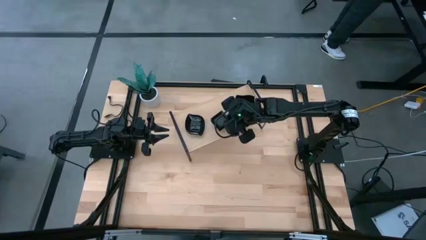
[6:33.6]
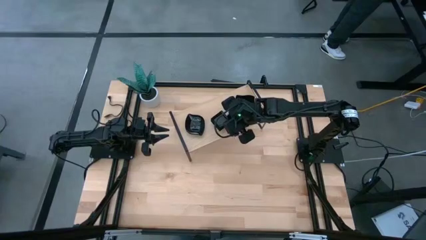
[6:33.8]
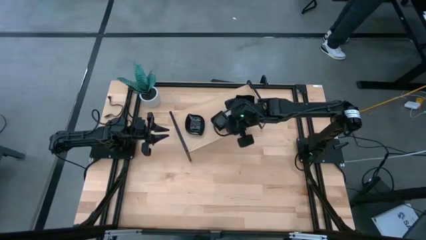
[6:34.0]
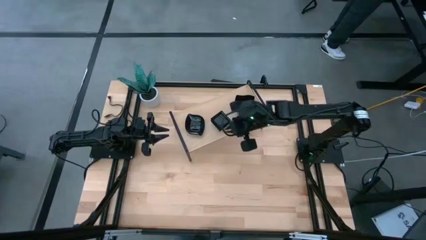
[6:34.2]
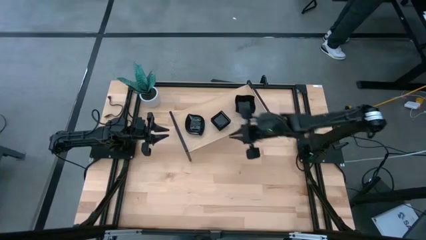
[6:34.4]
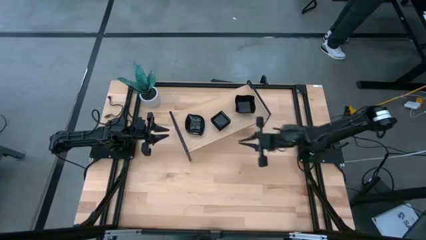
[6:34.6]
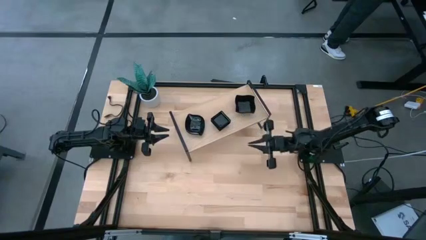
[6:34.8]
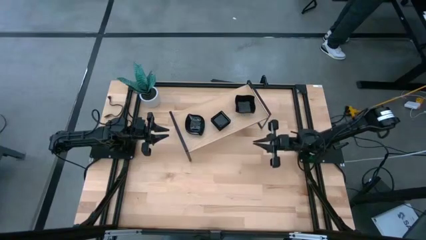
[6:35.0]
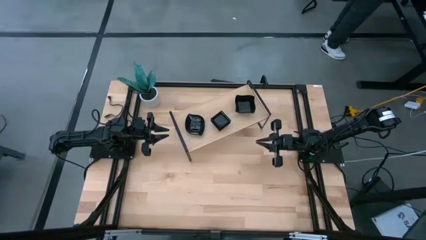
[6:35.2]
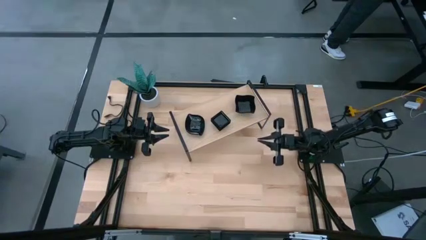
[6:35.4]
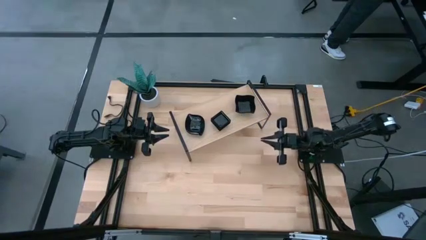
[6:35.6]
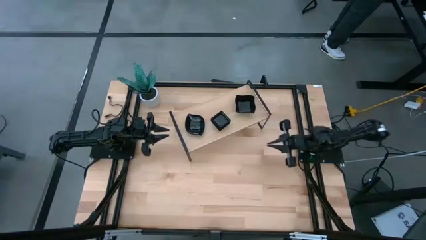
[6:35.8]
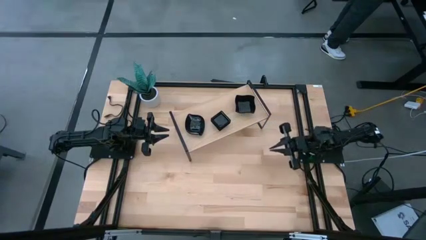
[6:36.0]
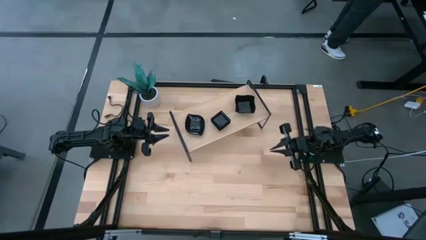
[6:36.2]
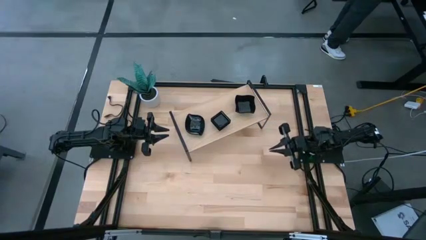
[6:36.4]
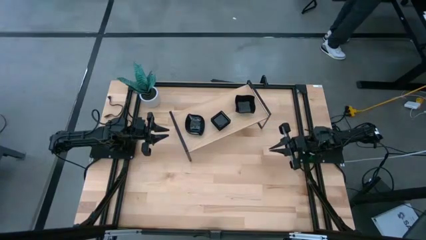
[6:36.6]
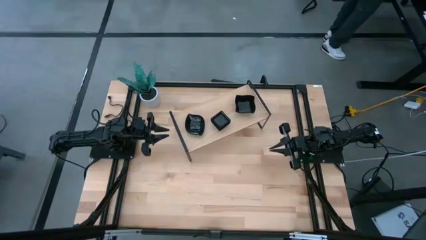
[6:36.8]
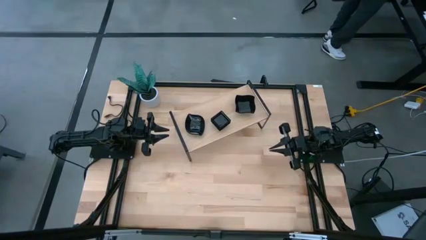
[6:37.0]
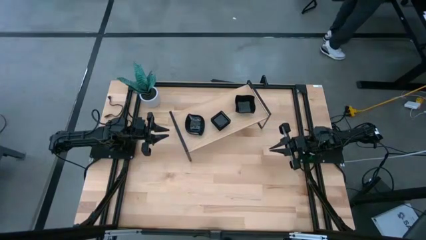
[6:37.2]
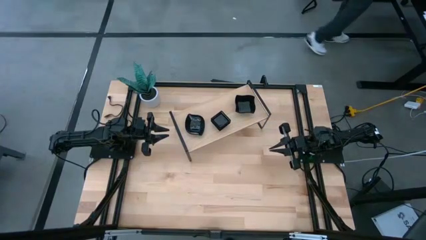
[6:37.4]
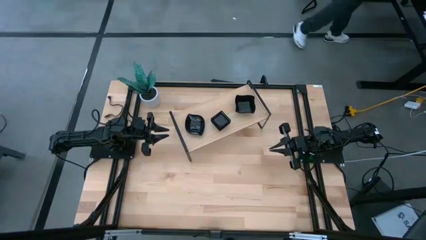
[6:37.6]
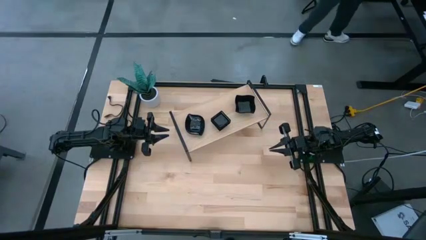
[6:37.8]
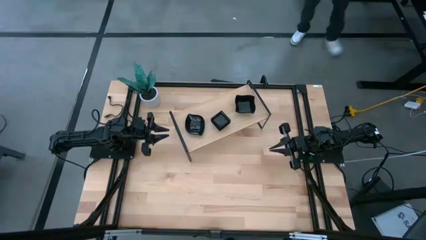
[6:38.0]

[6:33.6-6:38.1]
Task: Pick & Place Mini shaped plates
Return to Home Position

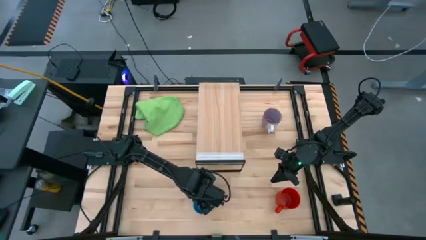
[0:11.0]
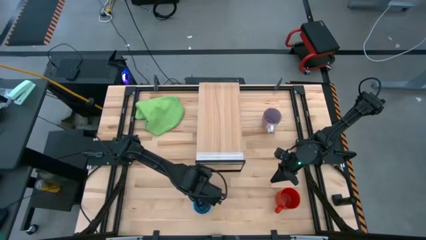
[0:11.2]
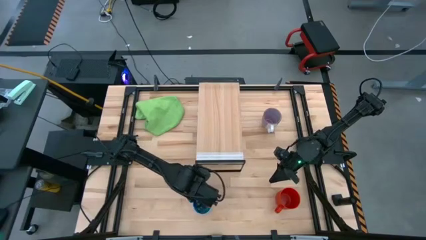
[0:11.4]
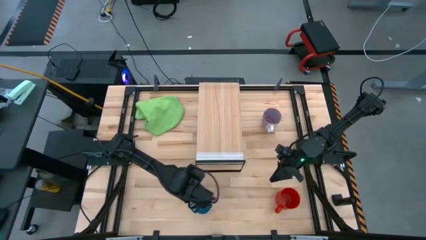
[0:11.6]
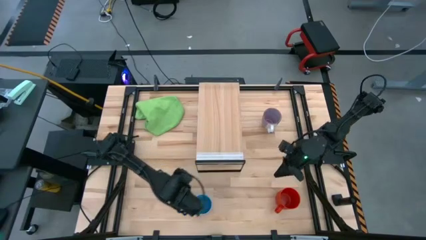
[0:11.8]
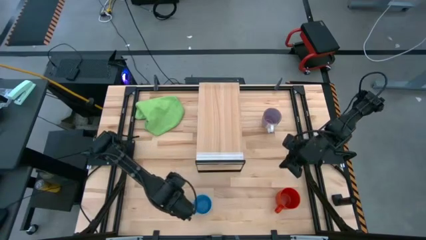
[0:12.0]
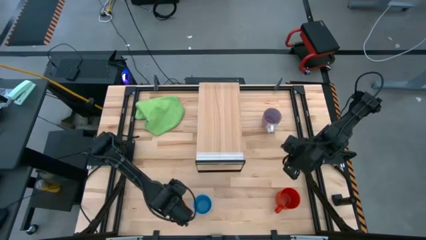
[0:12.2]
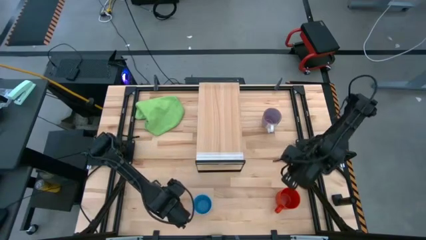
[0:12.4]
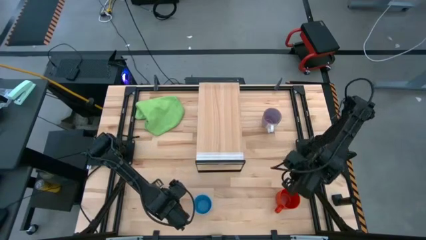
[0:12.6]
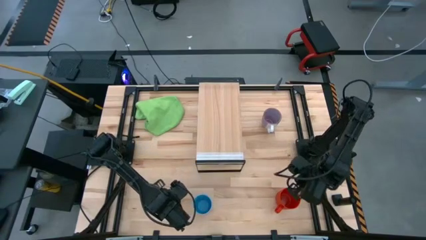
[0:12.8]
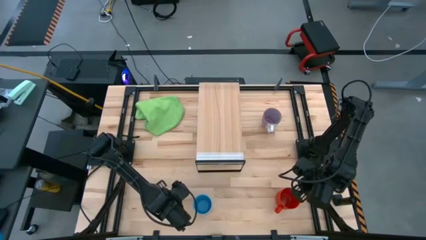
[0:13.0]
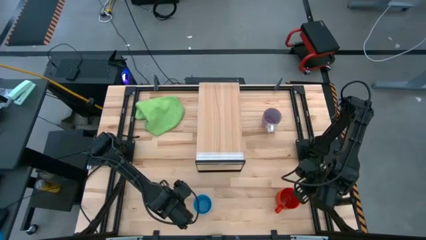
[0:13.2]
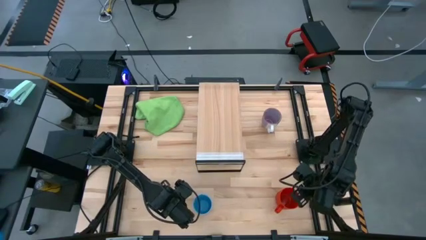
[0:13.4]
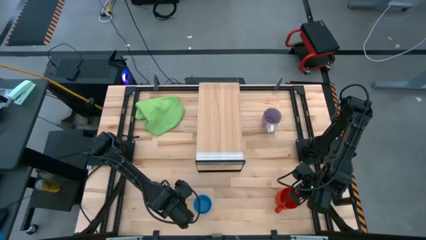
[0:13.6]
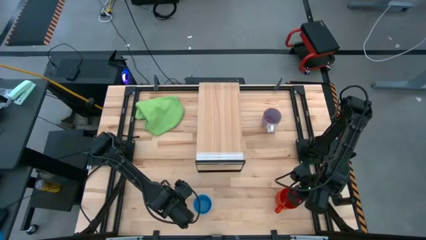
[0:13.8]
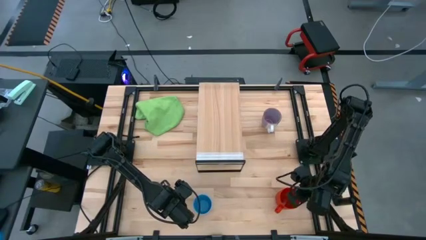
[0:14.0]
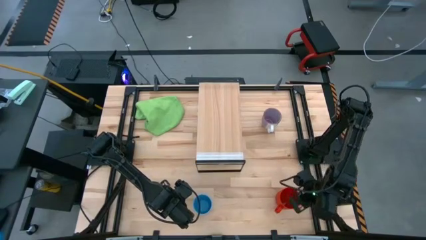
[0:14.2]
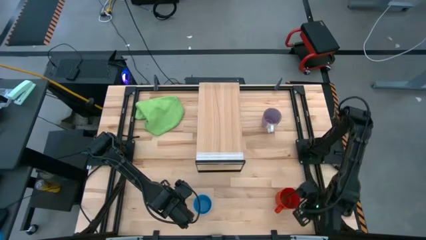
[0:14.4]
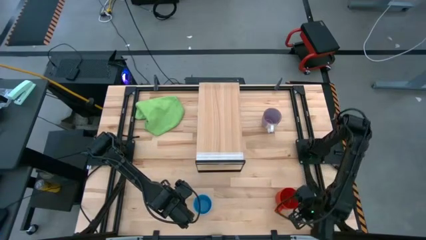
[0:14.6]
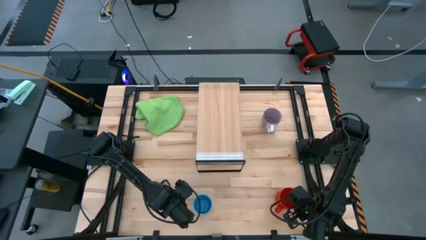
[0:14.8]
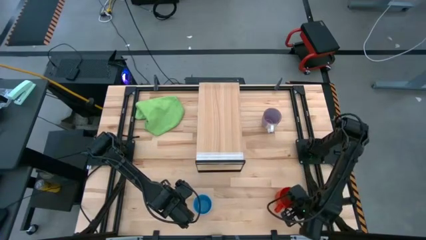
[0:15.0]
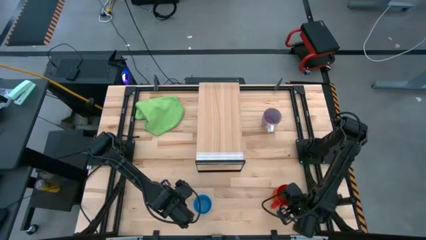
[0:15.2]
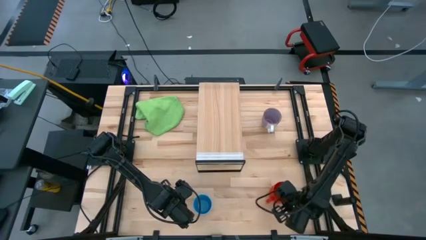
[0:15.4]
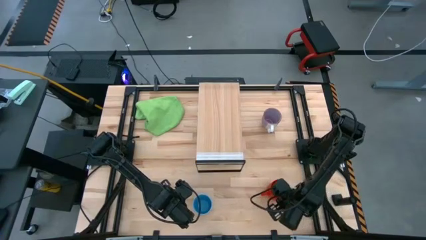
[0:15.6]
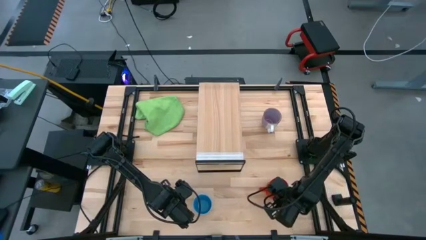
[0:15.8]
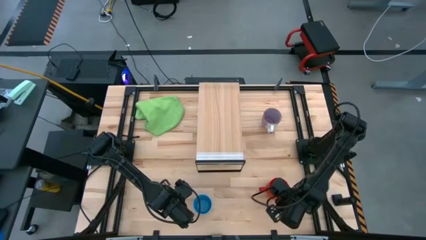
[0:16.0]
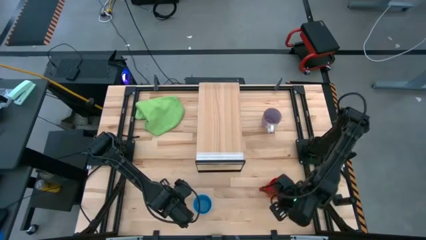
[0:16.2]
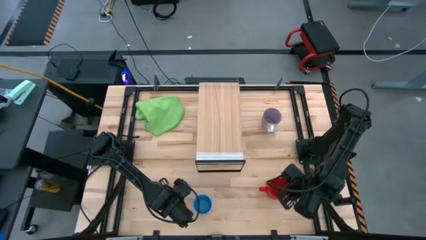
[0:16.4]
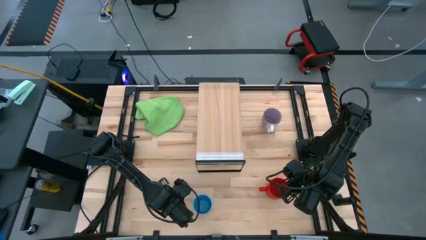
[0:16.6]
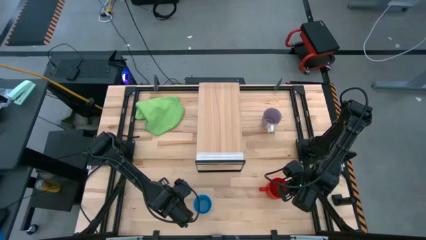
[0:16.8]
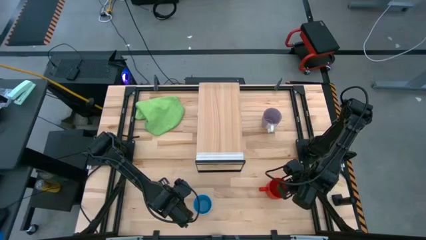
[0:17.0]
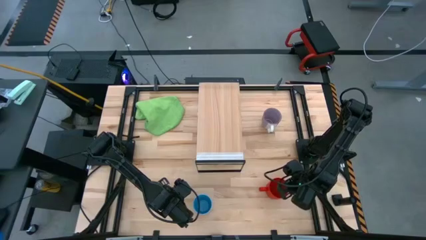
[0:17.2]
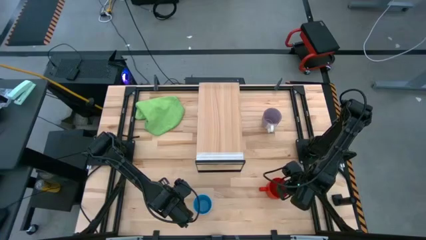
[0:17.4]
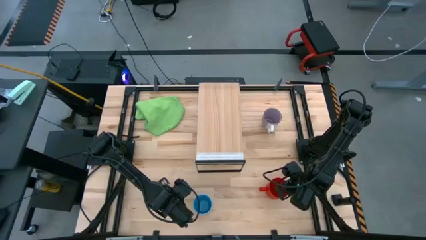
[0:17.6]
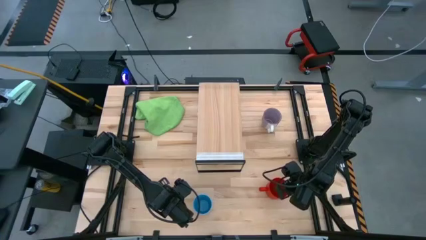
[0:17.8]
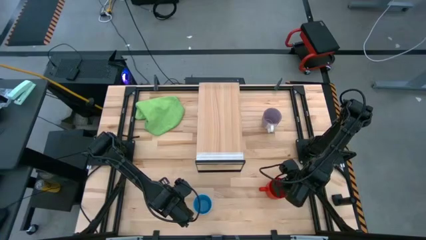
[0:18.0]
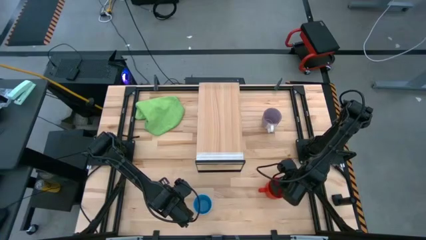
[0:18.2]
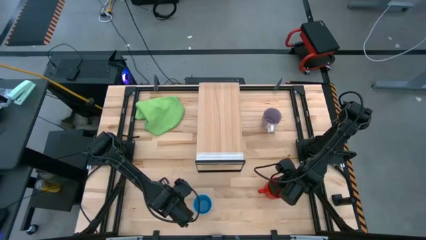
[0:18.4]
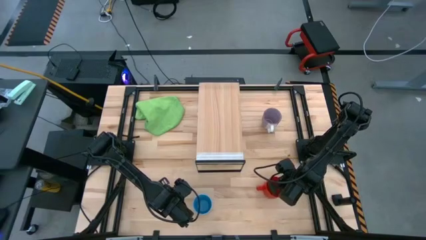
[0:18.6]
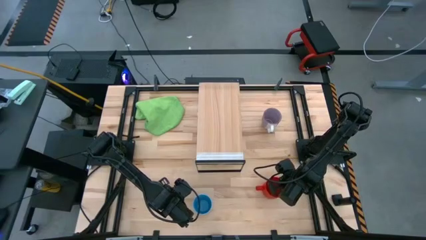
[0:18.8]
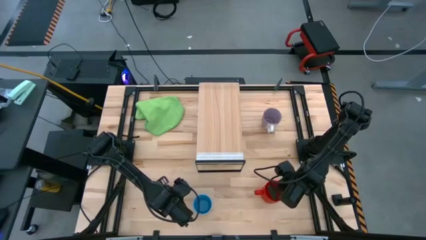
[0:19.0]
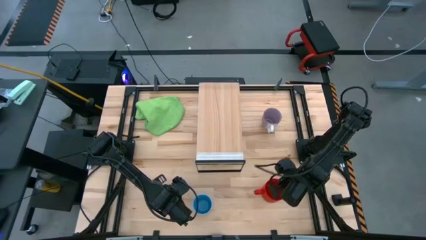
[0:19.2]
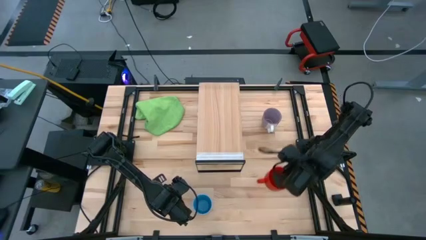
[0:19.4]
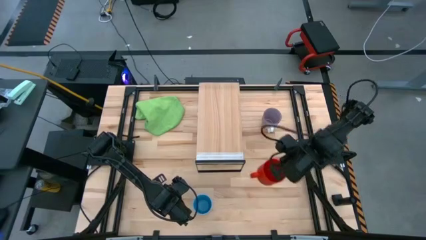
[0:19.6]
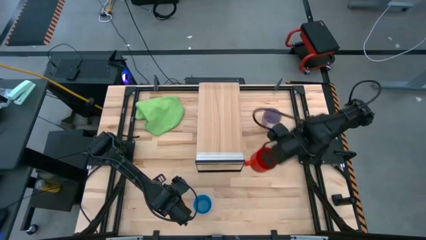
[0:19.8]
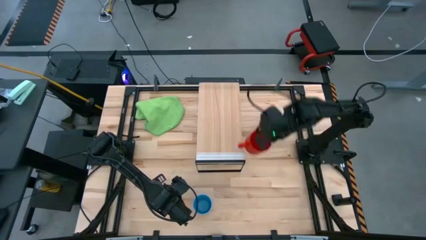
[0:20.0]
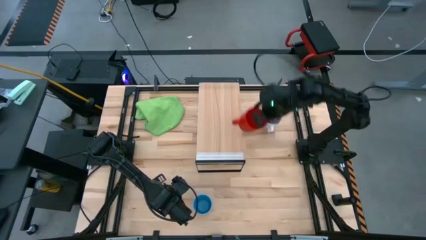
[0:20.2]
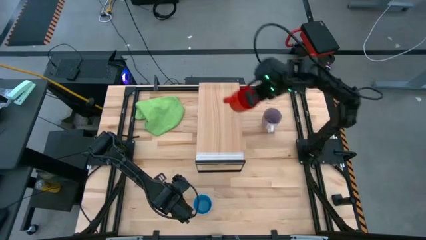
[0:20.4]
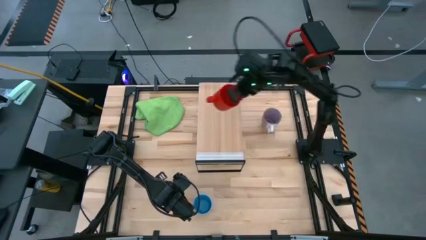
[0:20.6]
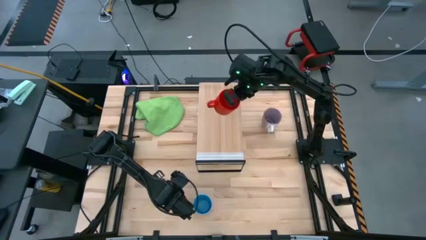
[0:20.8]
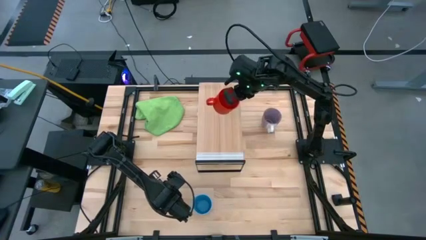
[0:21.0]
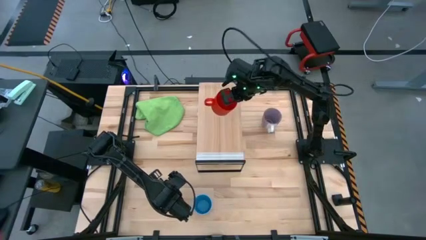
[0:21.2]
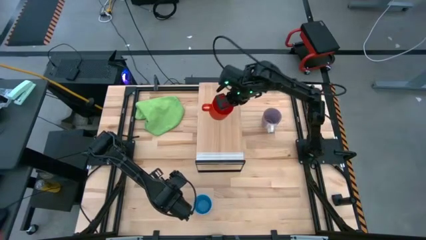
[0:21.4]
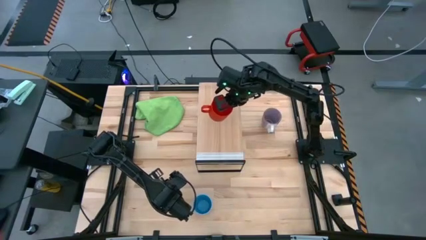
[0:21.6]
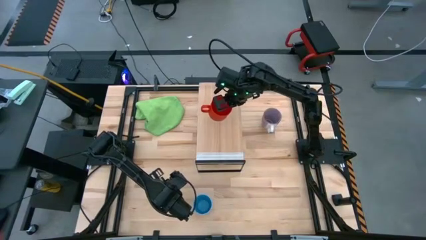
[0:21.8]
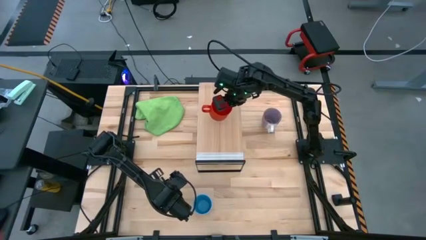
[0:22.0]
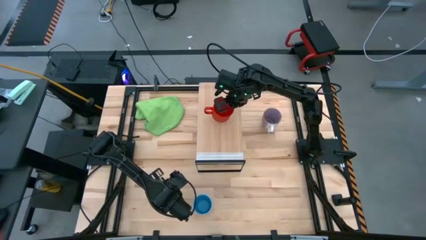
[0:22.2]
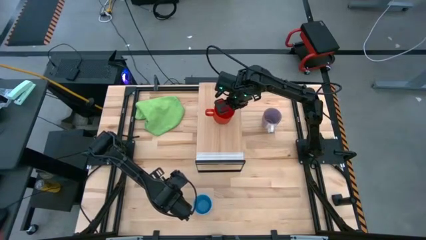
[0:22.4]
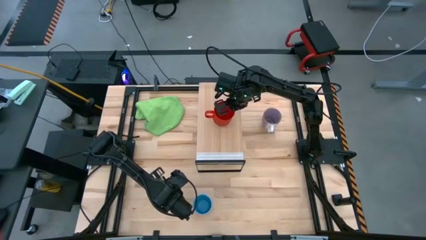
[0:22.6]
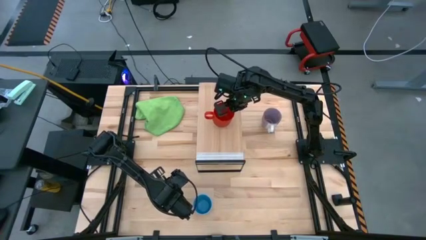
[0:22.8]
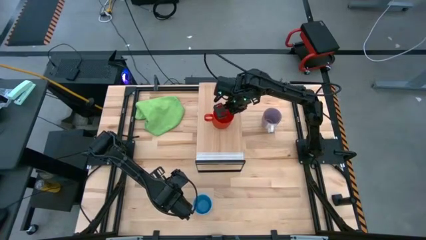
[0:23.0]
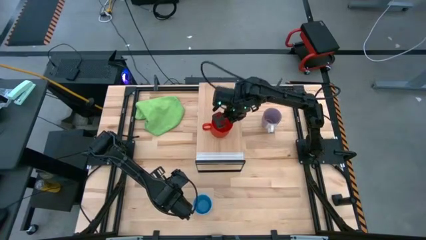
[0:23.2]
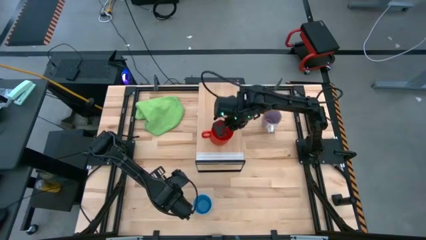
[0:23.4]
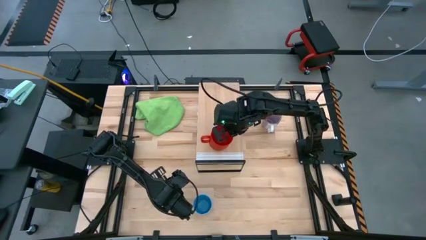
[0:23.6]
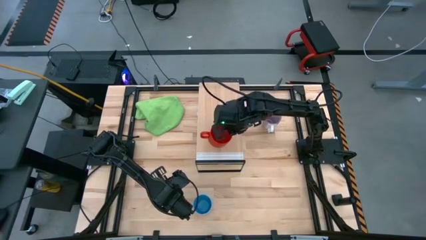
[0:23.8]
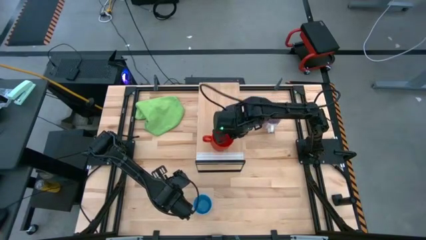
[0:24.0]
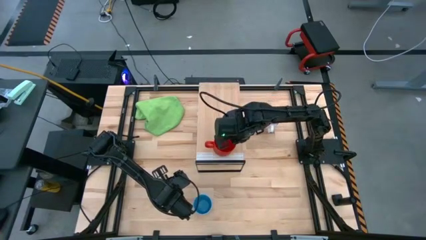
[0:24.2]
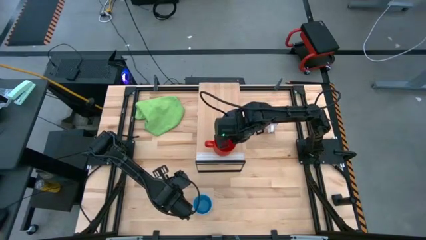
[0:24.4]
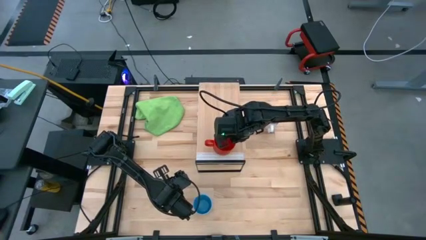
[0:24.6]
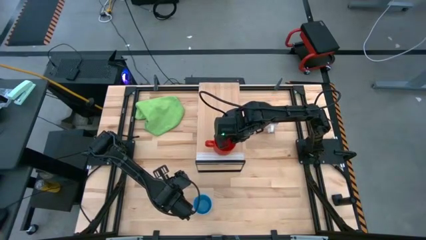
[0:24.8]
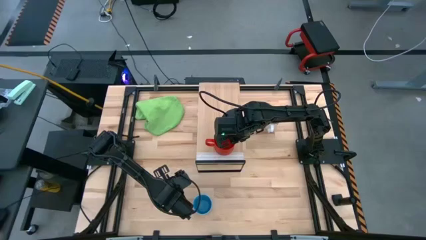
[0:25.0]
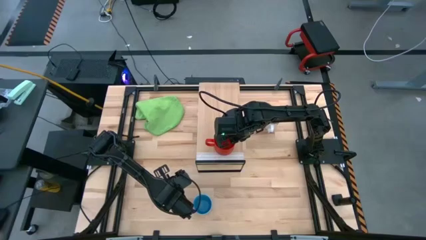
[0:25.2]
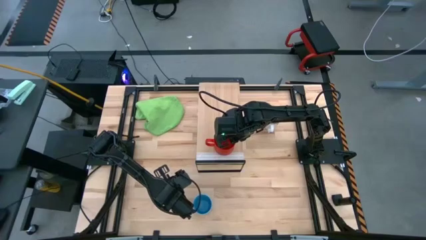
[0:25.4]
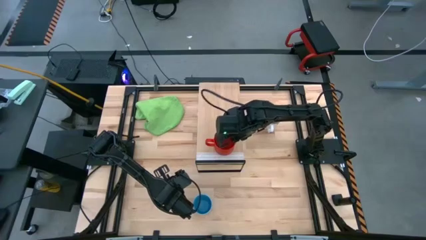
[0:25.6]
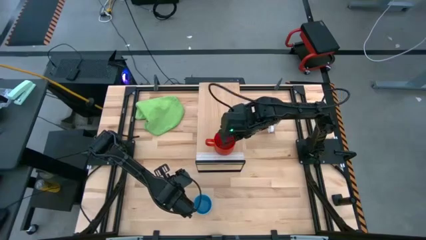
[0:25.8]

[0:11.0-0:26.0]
Task: Stack small to large cups/mugs on shelf
Put the red mug on the shelf
